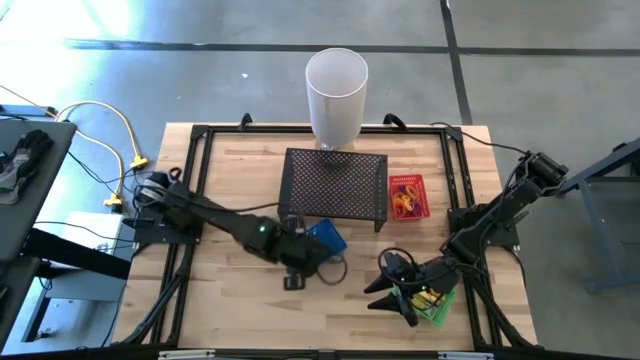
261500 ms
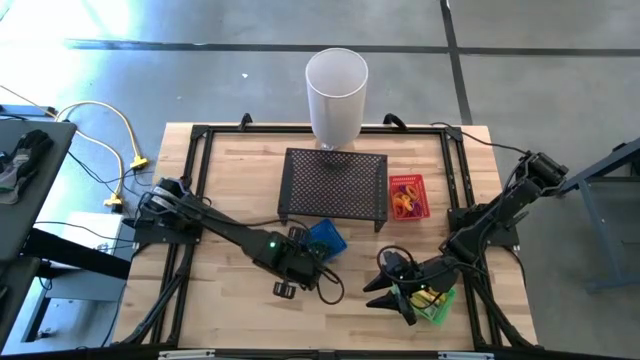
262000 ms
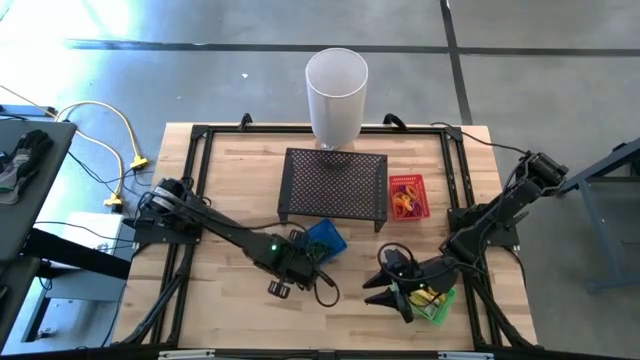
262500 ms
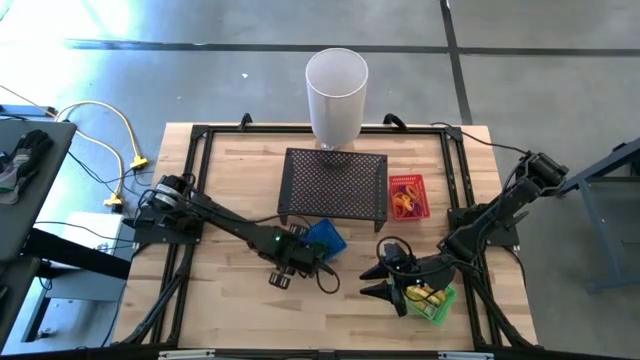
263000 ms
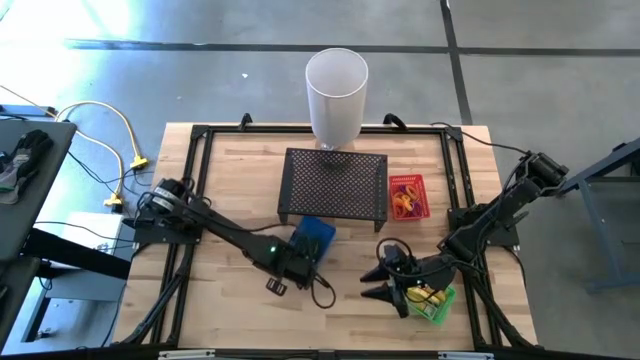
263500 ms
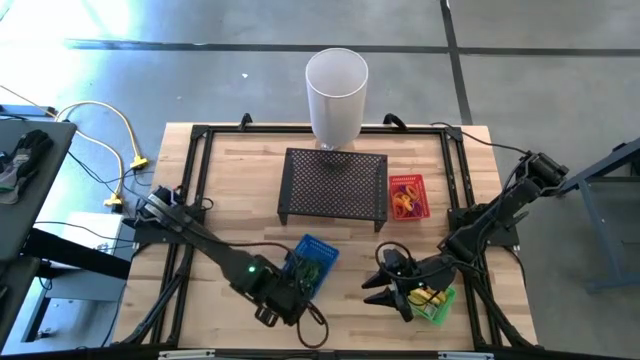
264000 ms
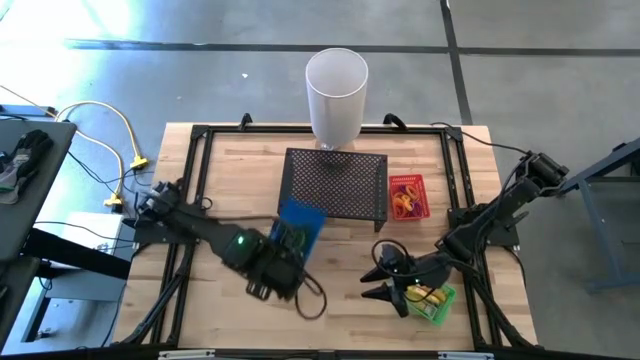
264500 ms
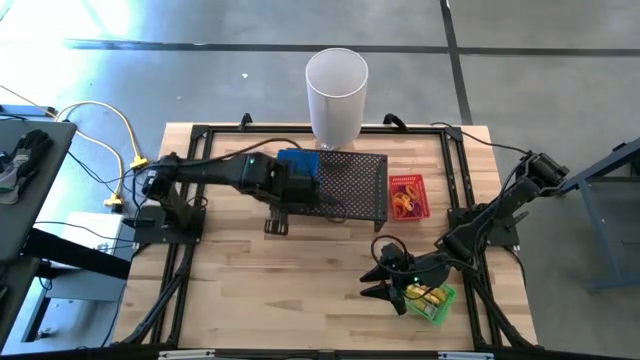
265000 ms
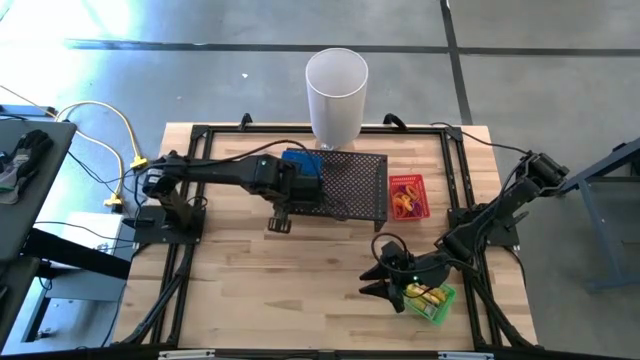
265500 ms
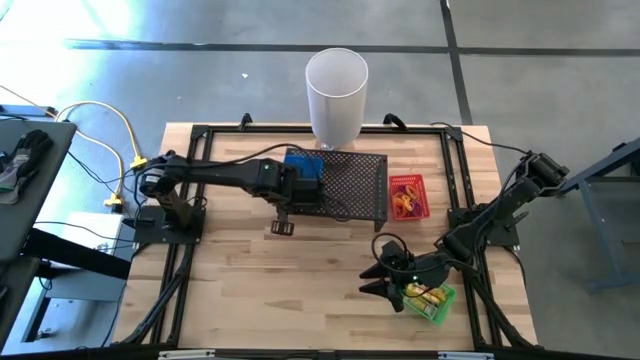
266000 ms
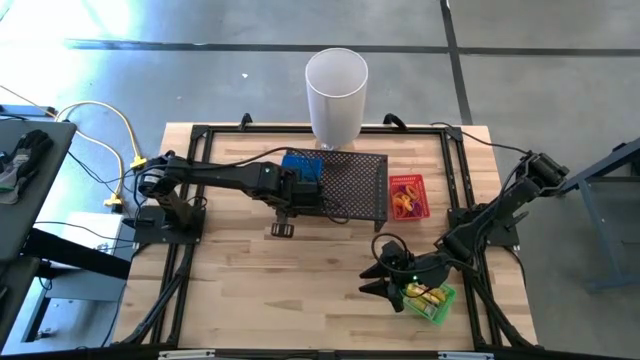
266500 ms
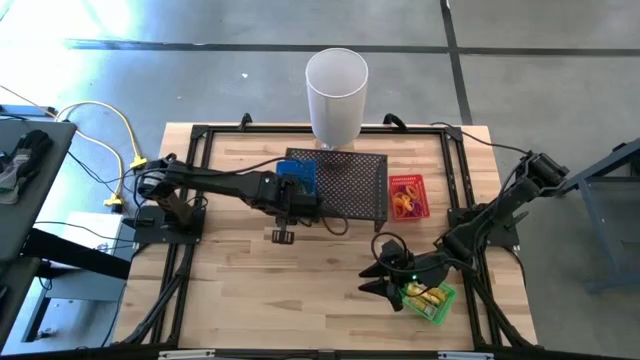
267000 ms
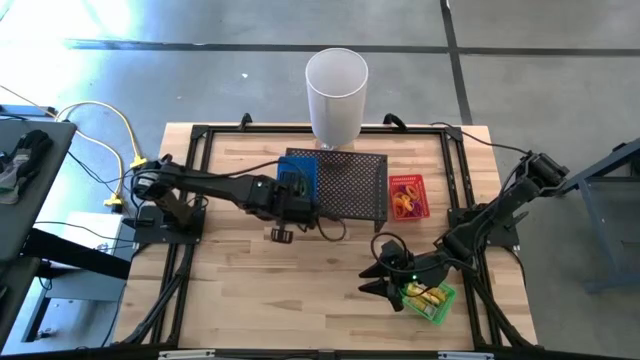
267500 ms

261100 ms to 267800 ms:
Task: Pick & Place Office Desk Supplies
Put the blue bin on the shelf

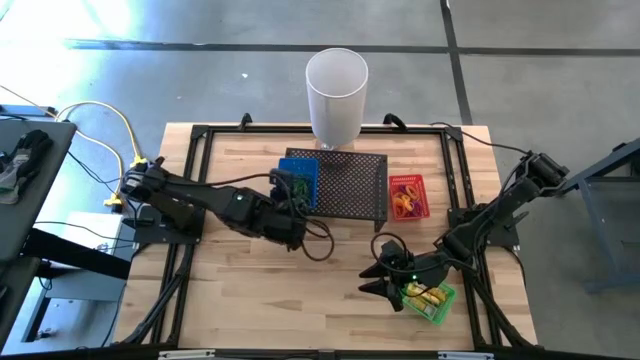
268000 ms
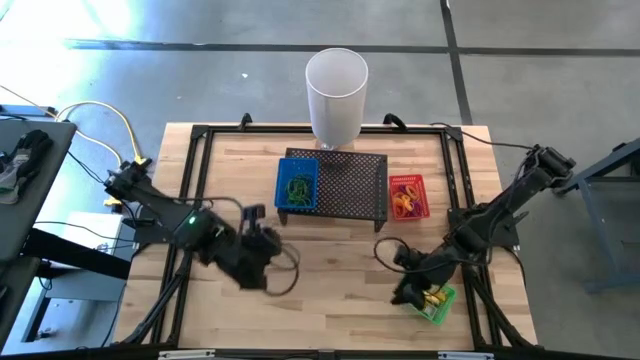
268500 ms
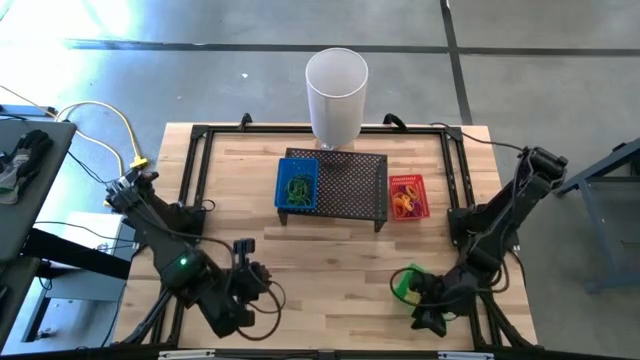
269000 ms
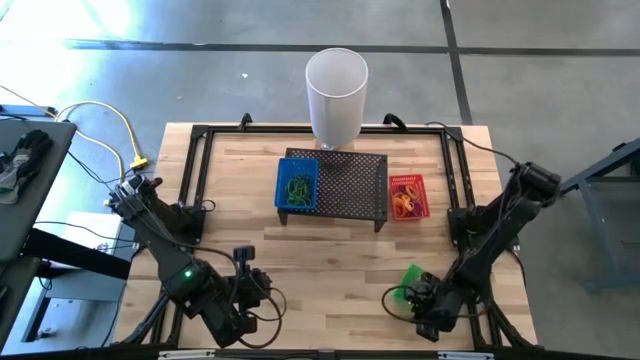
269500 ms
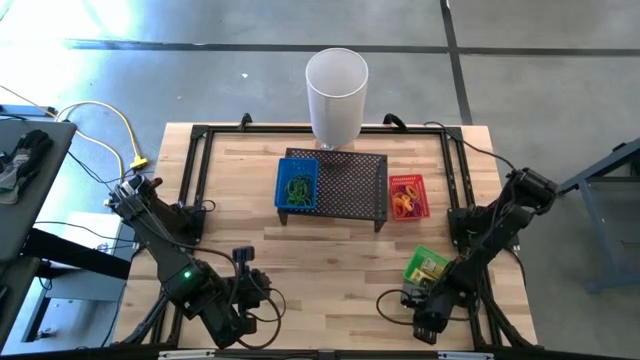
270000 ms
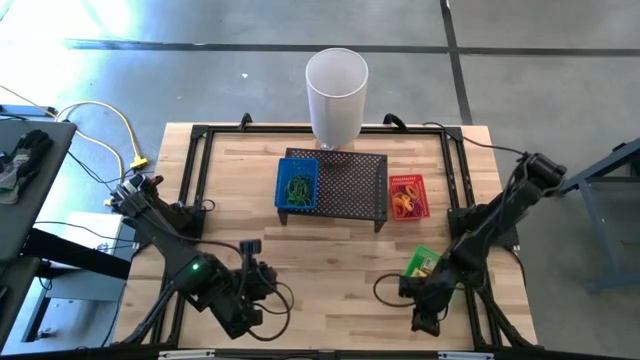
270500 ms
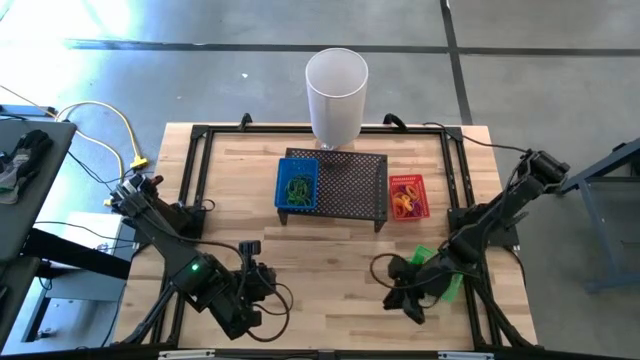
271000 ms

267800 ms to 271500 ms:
Put the green bin on the shelf

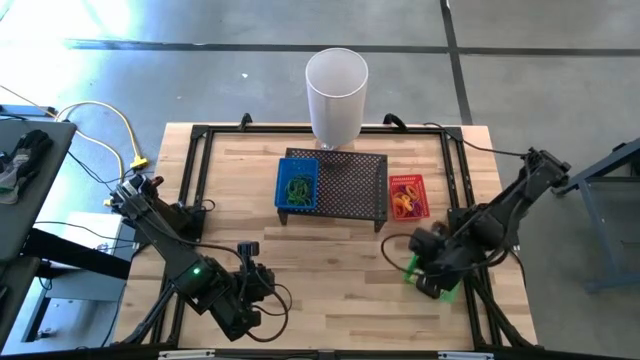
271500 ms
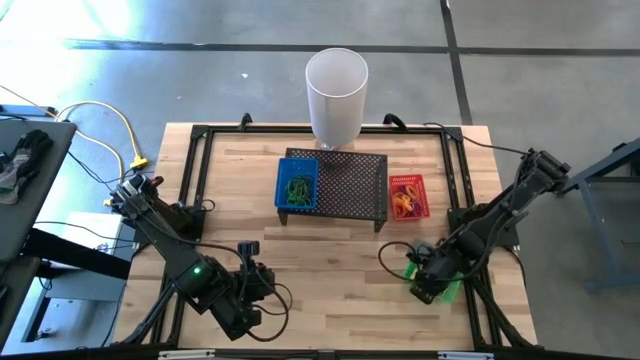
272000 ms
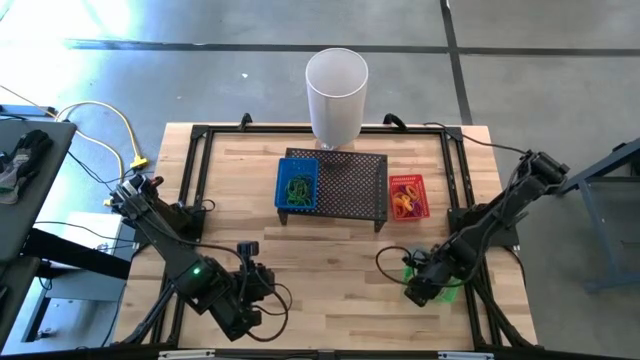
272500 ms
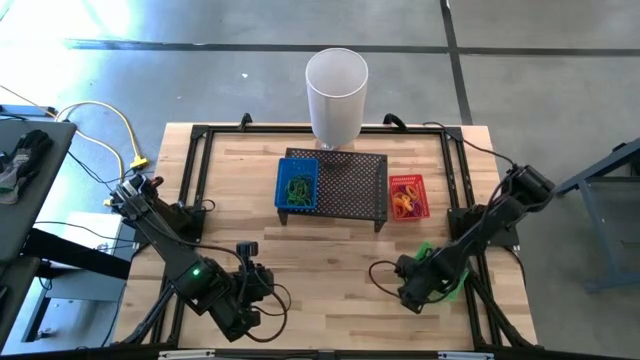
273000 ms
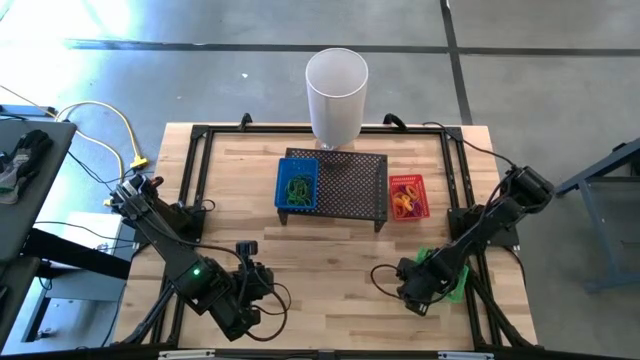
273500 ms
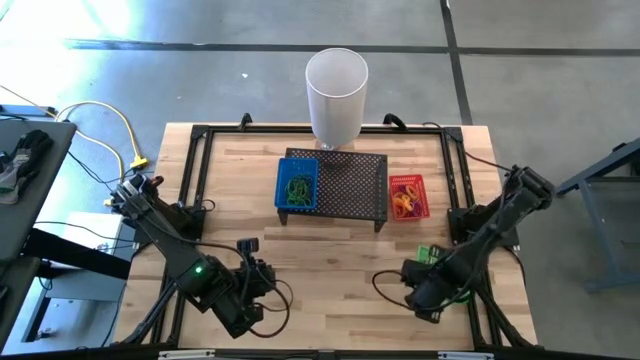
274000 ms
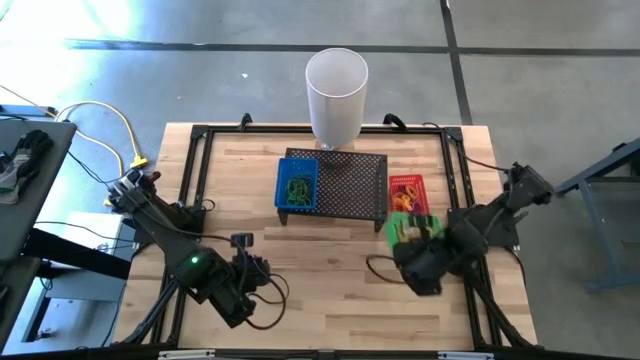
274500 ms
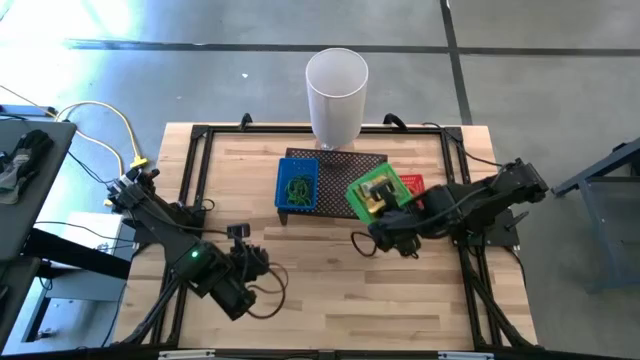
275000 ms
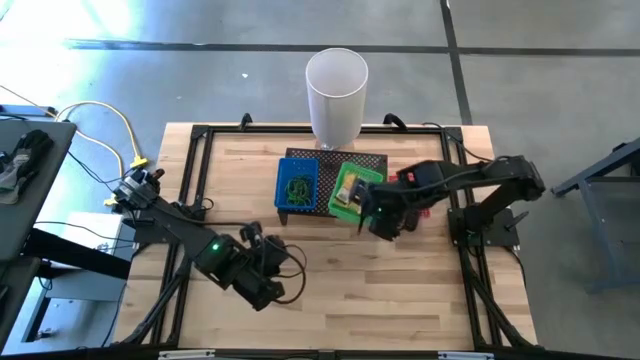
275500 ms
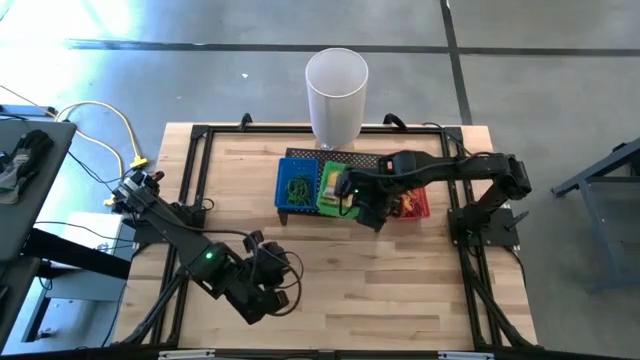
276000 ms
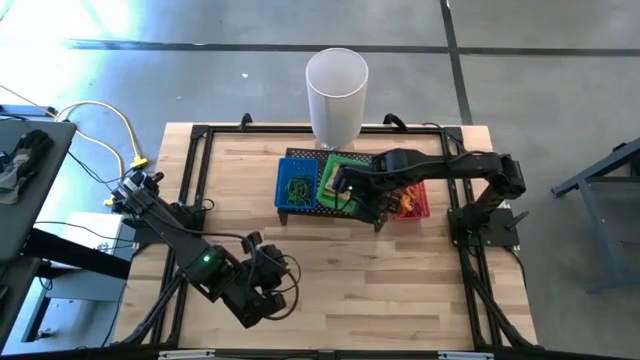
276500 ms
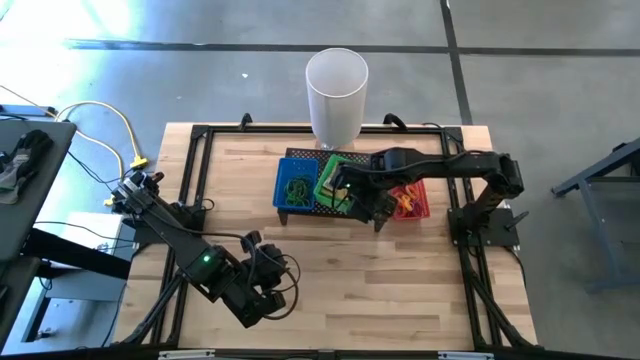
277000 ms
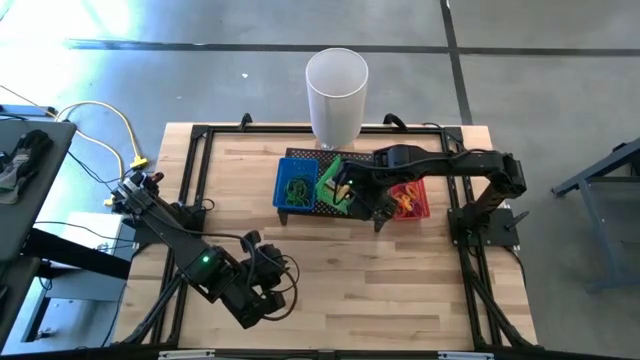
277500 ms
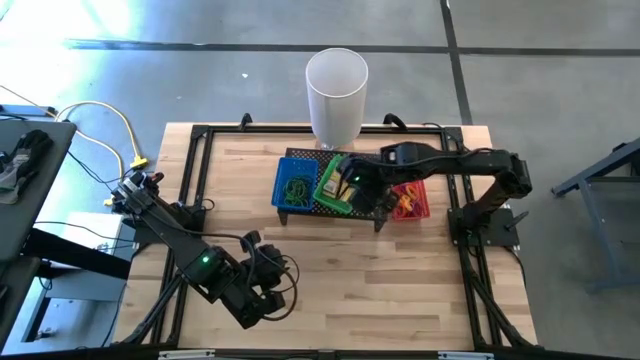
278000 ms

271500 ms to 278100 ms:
Put the green bin on the shelf

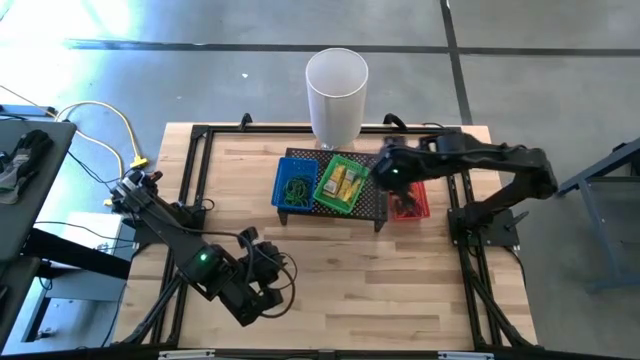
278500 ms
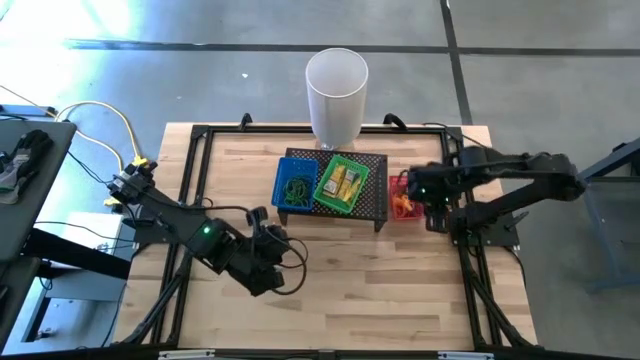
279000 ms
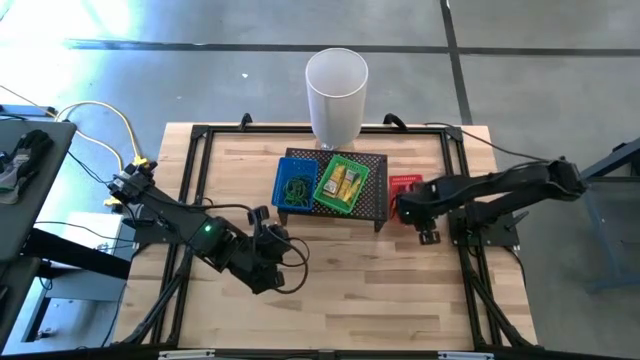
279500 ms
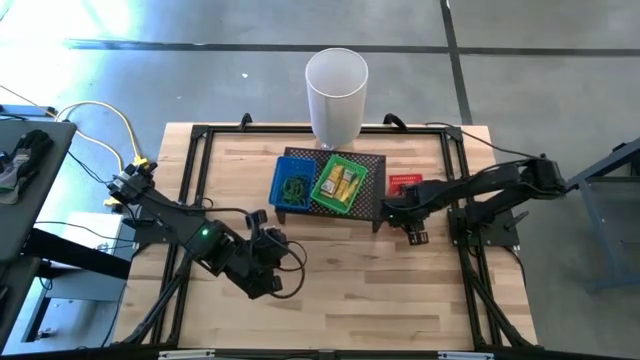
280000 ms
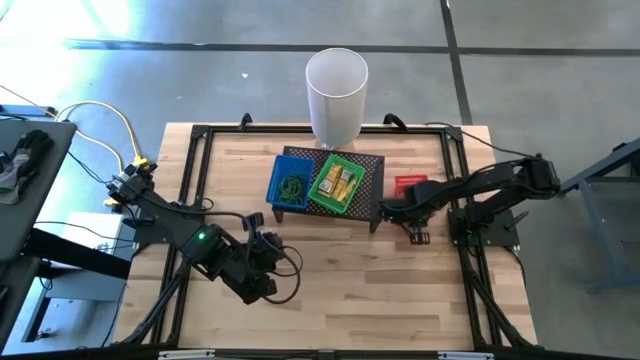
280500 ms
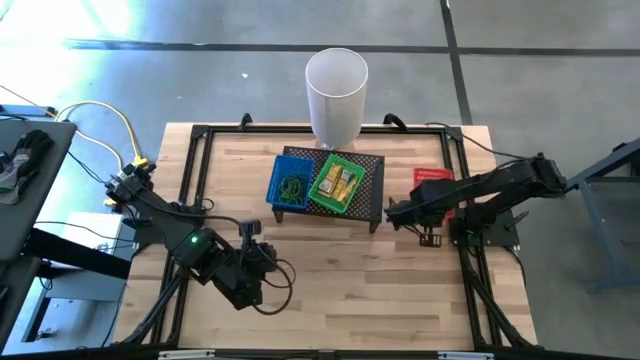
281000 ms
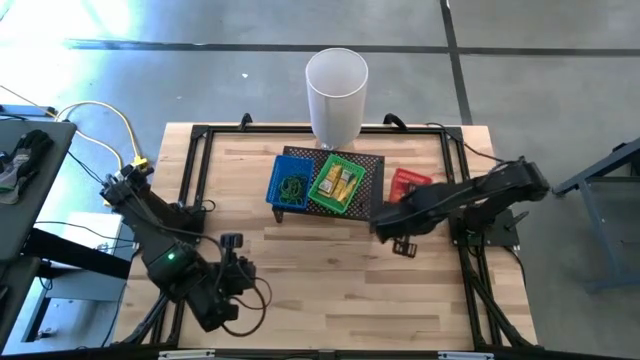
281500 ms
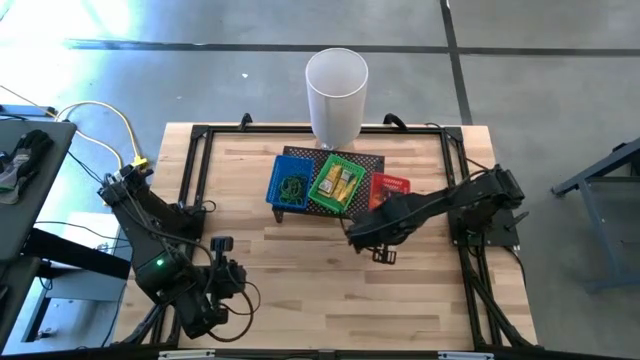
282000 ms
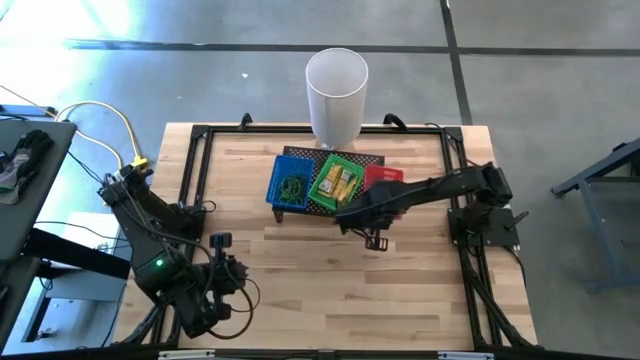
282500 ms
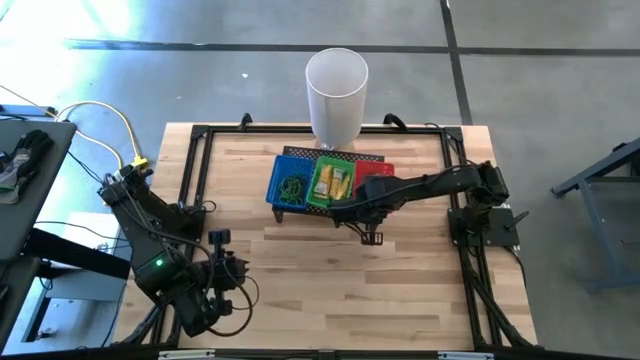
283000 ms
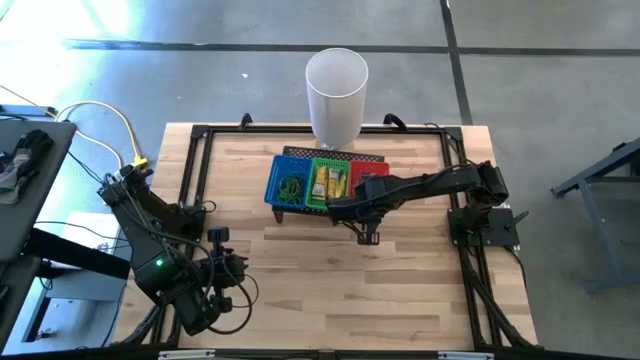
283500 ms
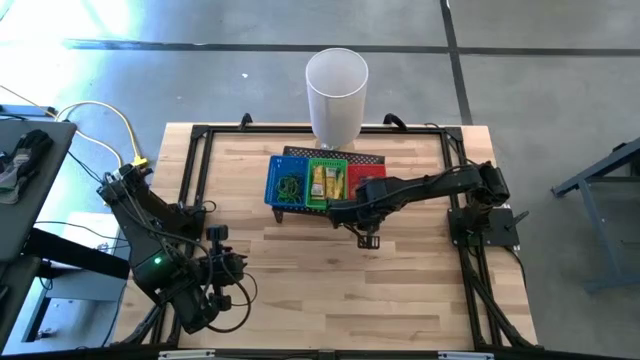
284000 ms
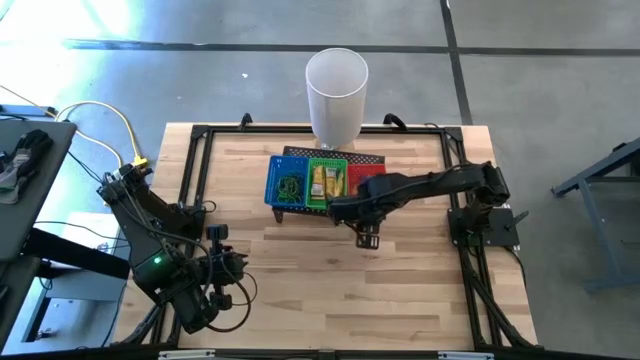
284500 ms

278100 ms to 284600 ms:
Put the red bin on the shelf
